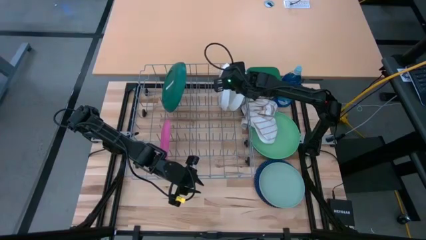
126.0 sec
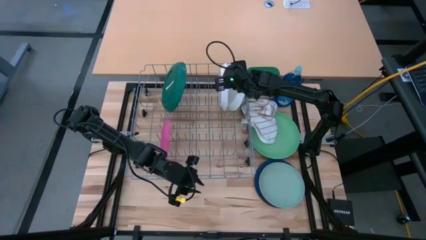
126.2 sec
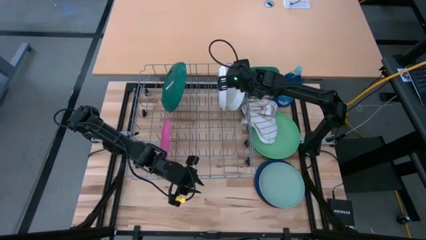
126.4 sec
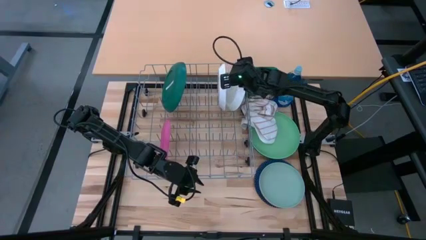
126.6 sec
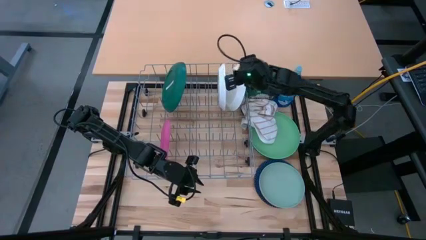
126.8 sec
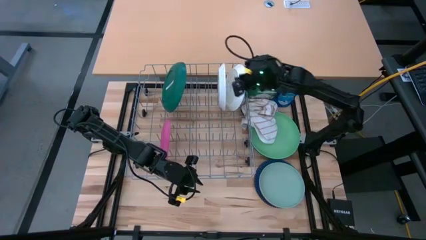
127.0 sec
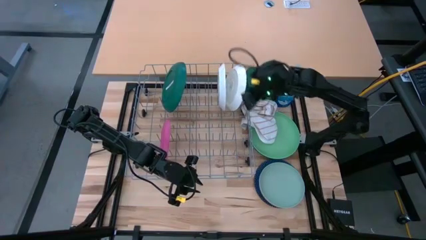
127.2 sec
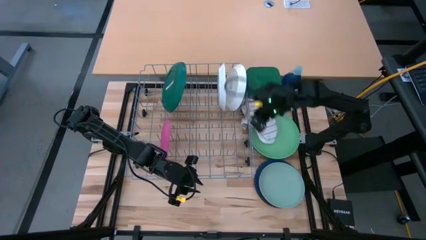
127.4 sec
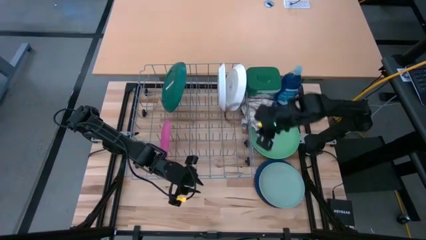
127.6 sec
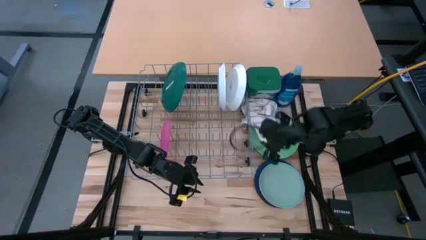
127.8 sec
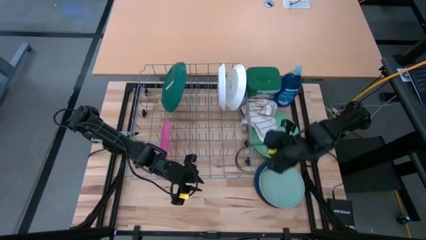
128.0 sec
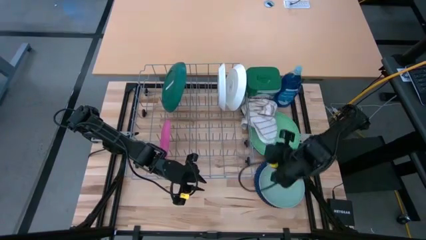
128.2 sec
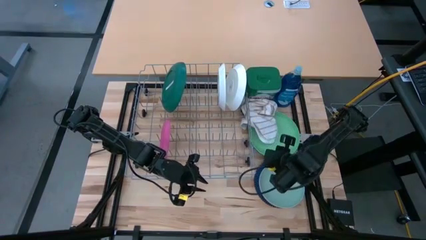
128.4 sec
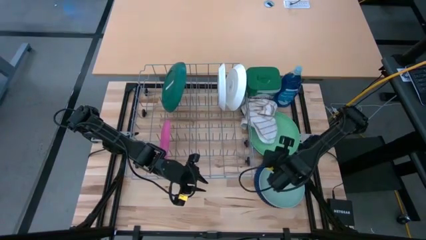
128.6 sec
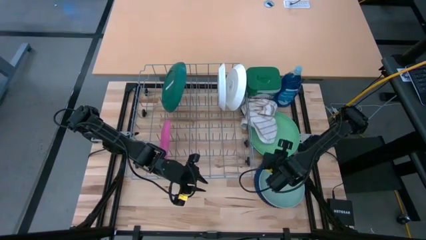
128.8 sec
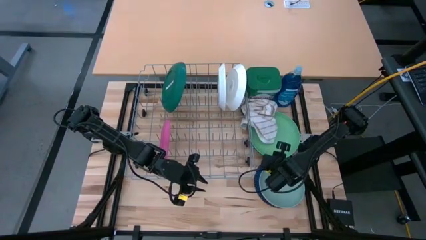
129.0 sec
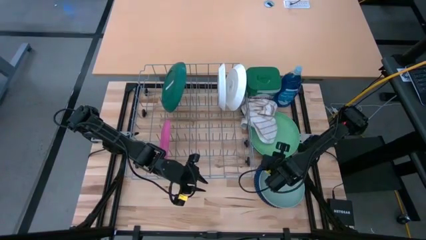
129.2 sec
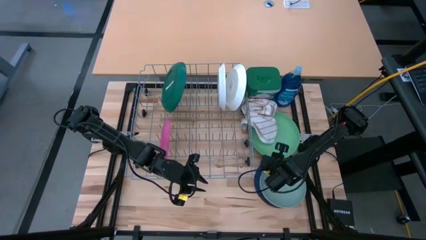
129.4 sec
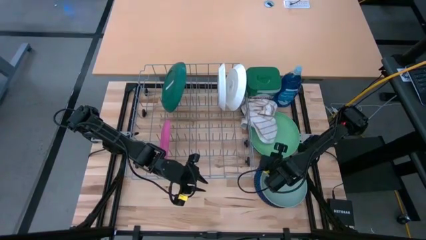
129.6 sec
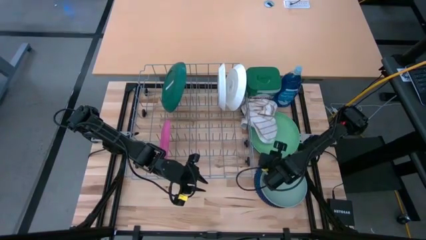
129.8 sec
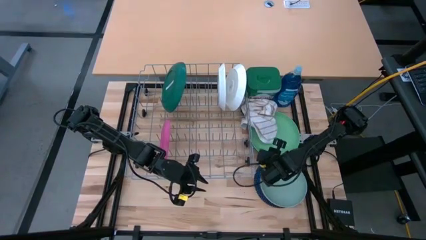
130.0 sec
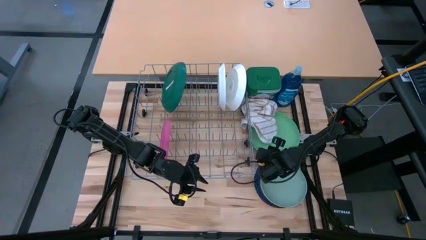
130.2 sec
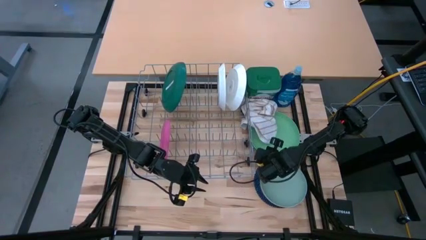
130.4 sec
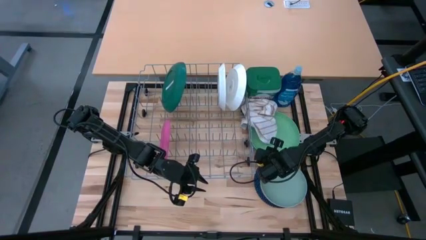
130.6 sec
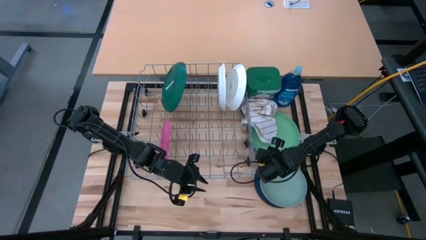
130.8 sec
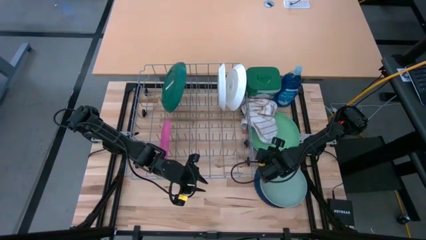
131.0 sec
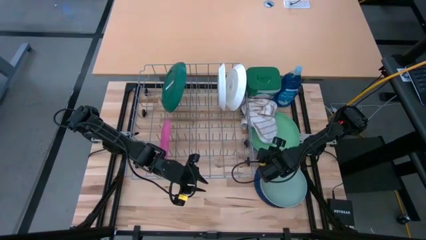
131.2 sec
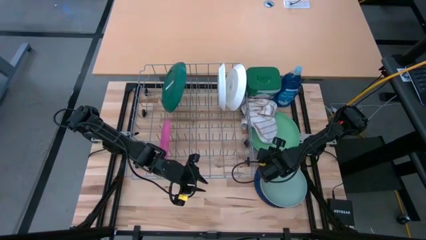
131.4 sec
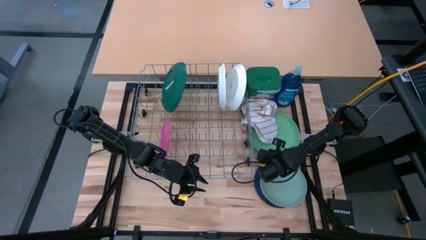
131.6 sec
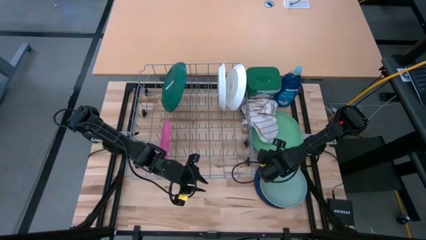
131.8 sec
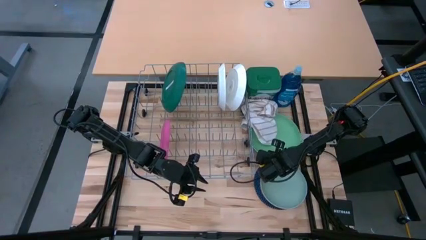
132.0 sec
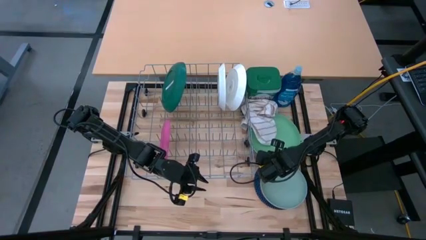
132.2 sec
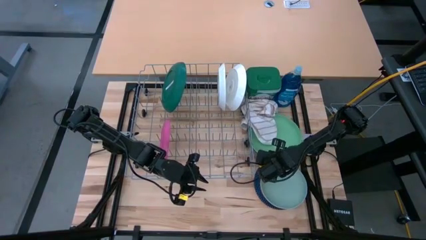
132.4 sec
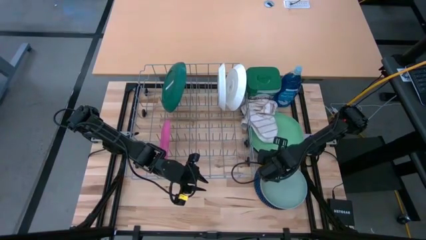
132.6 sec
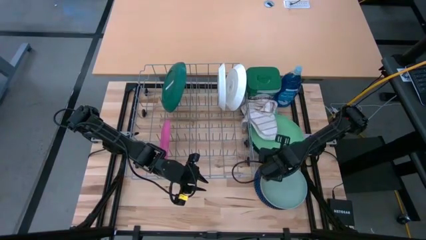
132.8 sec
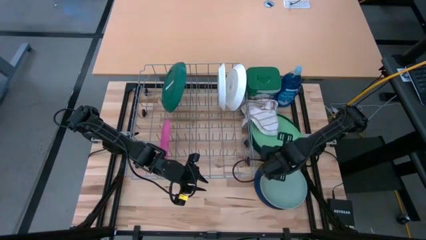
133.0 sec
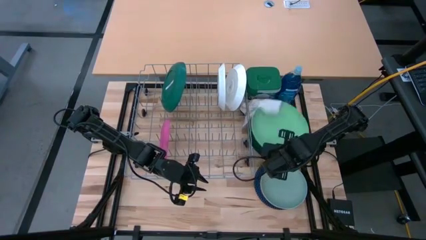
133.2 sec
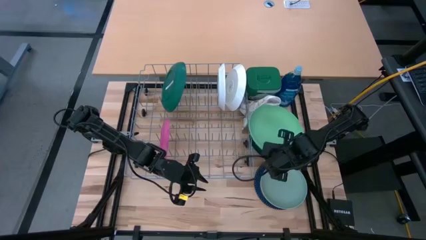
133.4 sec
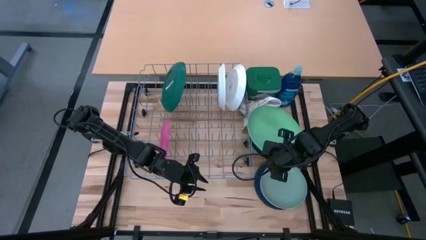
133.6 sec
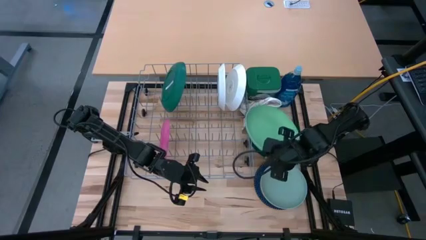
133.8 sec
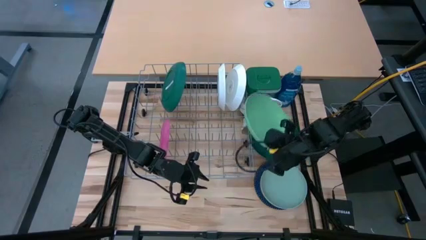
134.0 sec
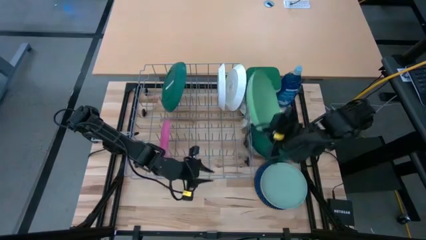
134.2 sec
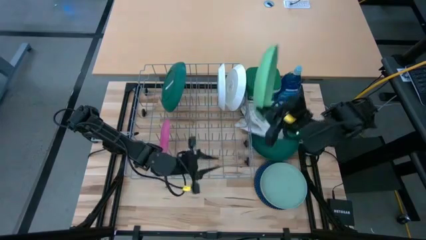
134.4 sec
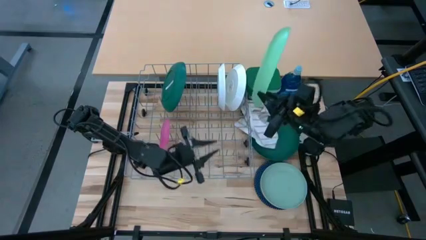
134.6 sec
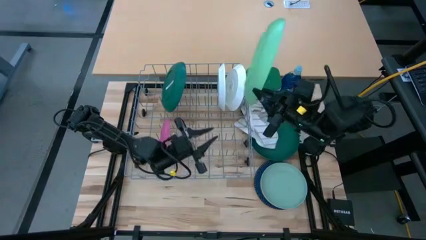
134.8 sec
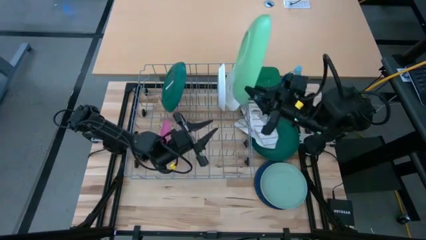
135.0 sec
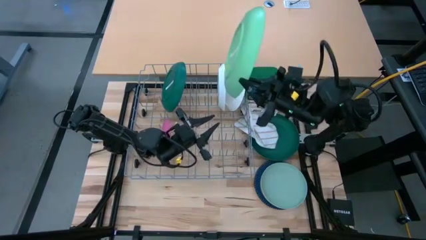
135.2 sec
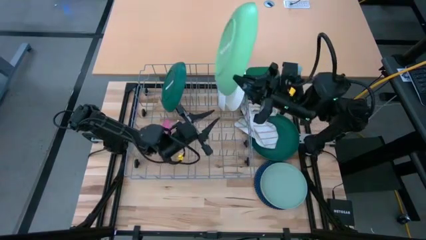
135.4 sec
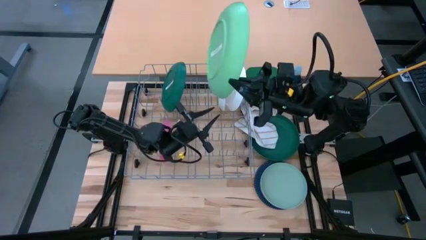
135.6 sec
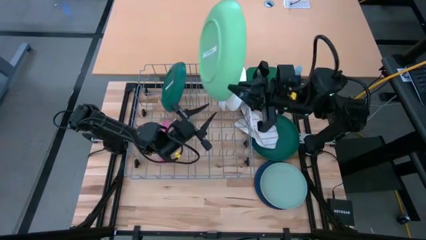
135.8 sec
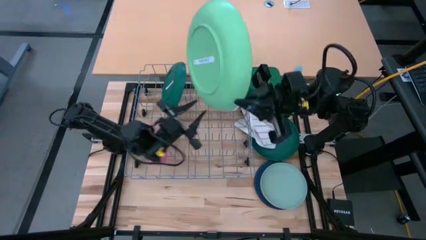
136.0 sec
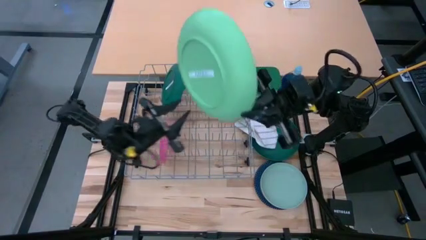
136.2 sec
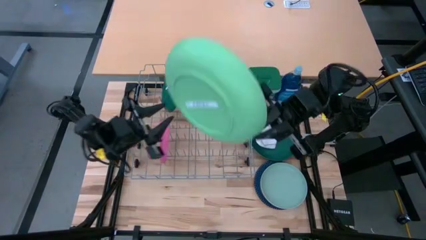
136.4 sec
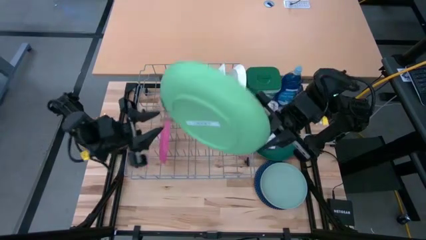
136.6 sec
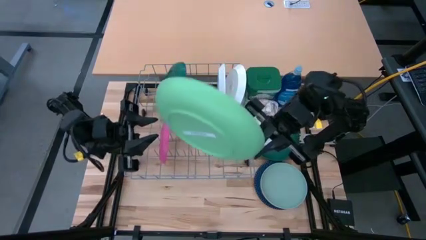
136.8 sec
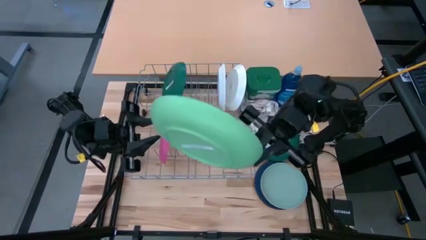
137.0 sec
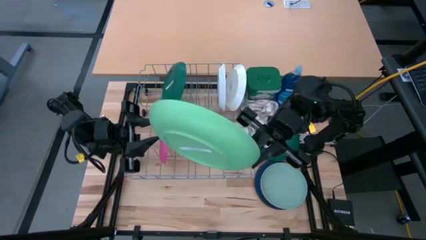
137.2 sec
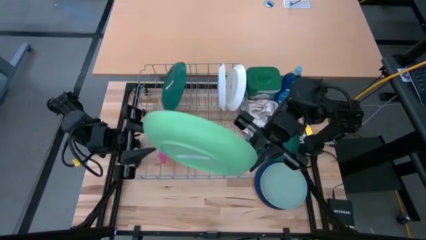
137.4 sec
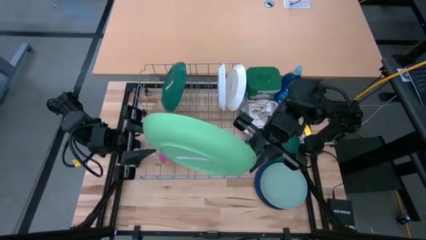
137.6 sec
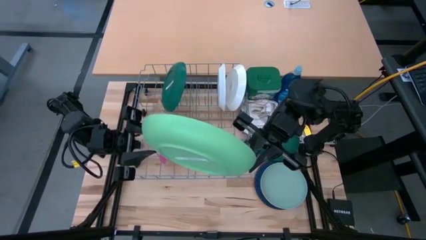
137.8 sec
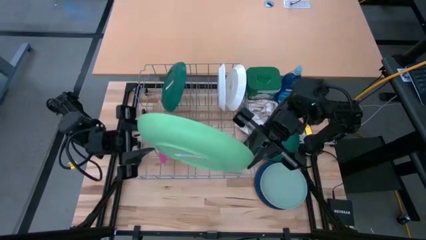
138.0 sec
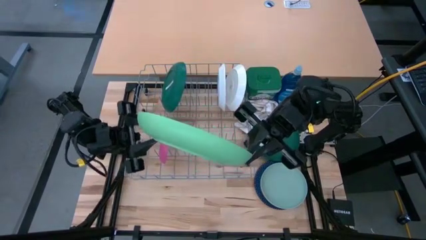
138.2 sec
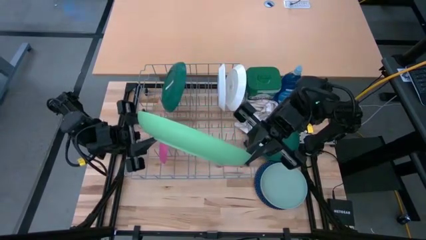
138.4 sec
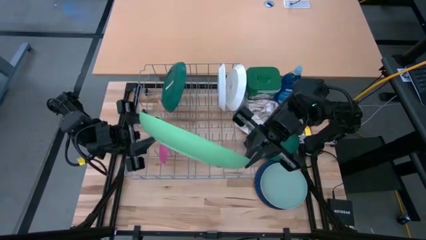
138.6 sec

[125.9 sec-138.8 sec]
Task: Sort dishes
Put the light green plate in the dish rack
